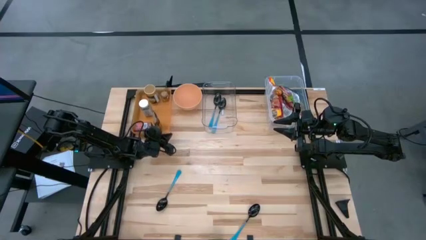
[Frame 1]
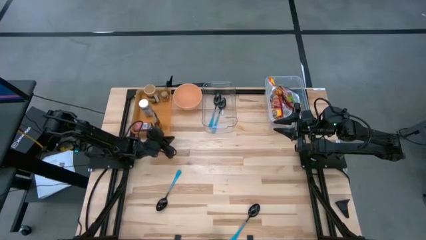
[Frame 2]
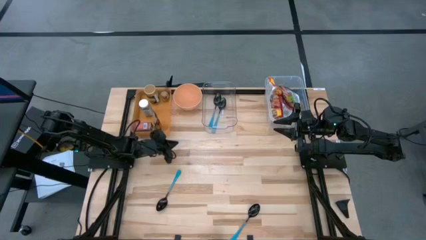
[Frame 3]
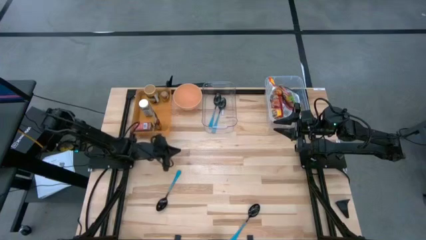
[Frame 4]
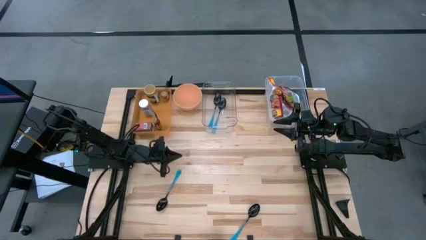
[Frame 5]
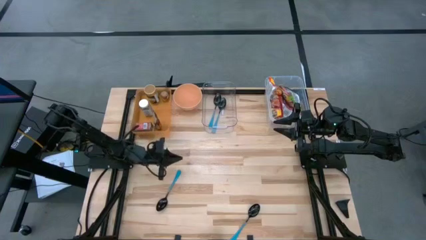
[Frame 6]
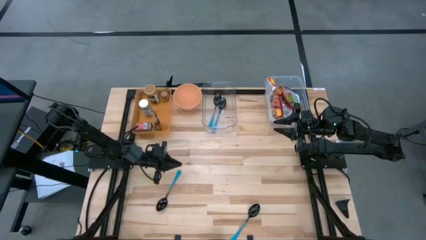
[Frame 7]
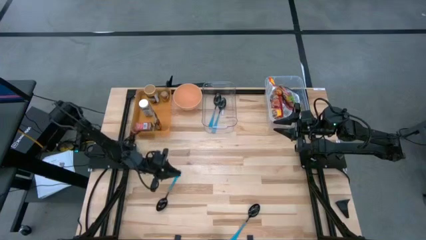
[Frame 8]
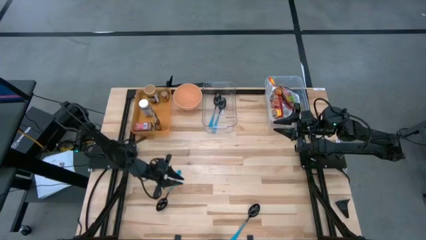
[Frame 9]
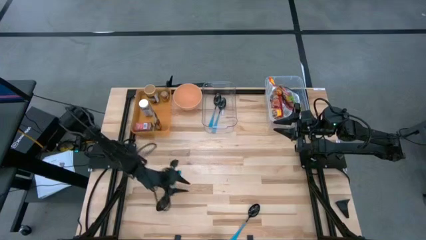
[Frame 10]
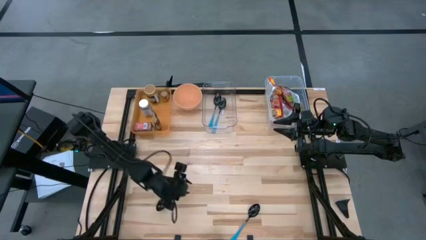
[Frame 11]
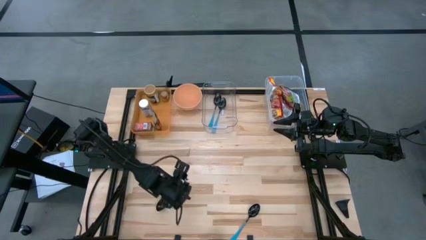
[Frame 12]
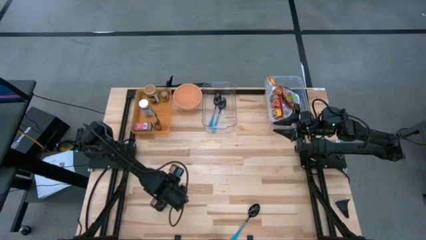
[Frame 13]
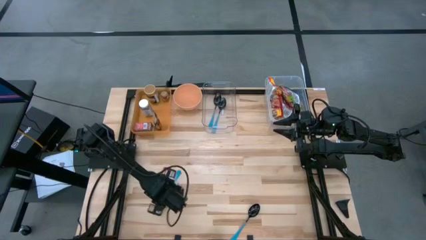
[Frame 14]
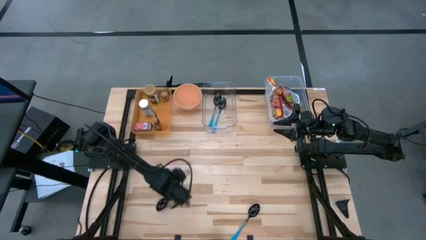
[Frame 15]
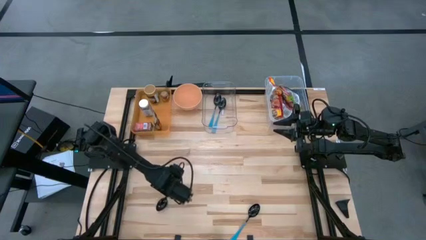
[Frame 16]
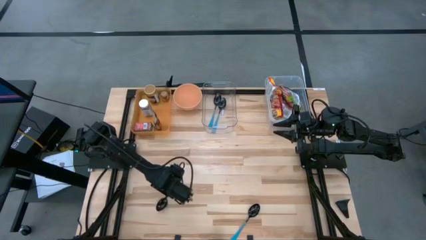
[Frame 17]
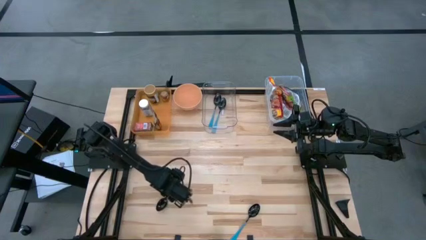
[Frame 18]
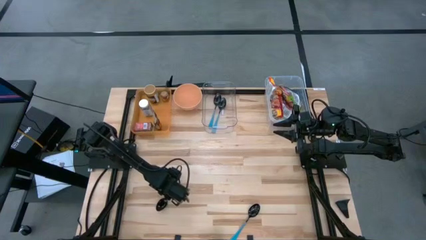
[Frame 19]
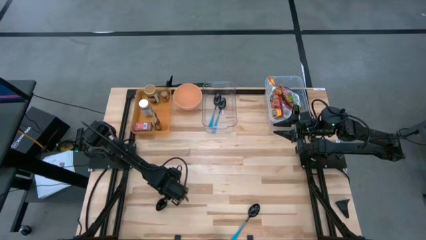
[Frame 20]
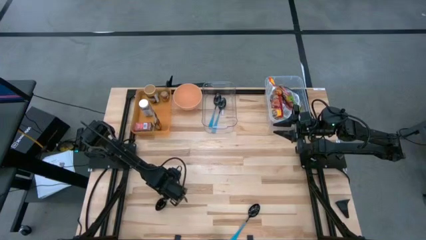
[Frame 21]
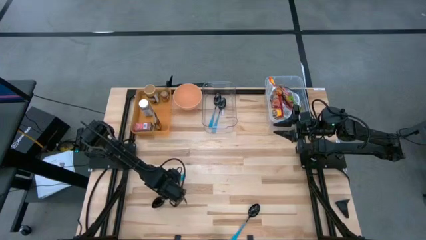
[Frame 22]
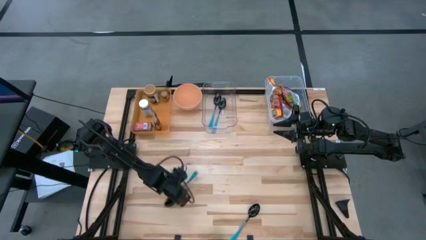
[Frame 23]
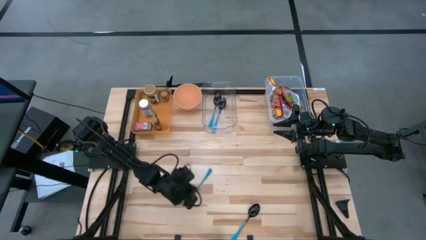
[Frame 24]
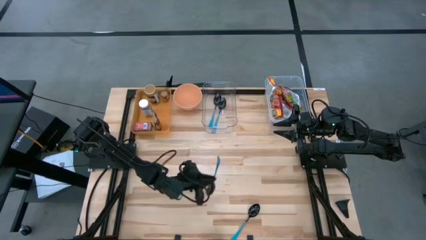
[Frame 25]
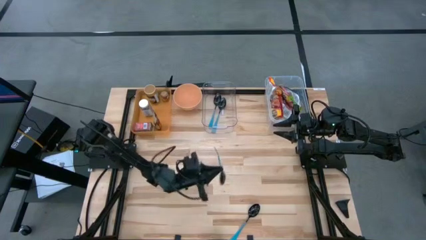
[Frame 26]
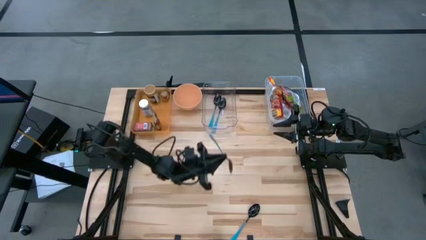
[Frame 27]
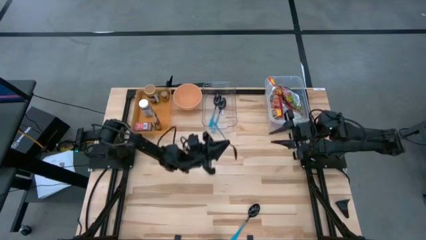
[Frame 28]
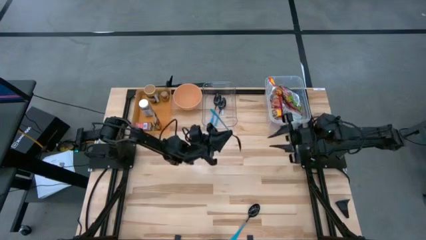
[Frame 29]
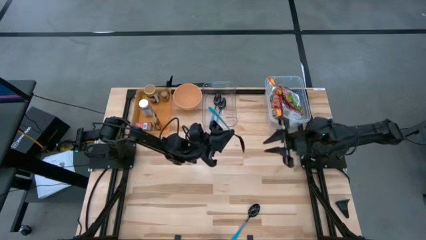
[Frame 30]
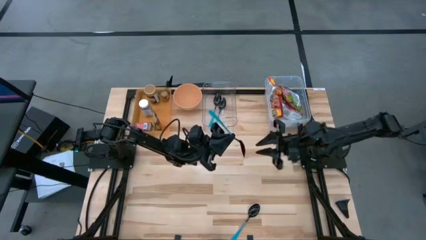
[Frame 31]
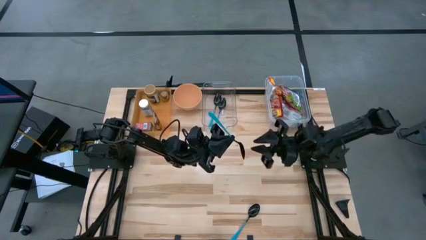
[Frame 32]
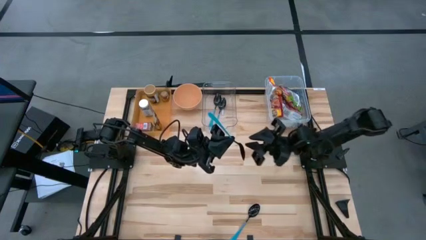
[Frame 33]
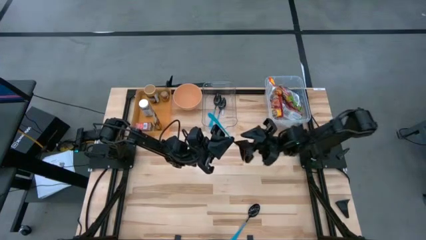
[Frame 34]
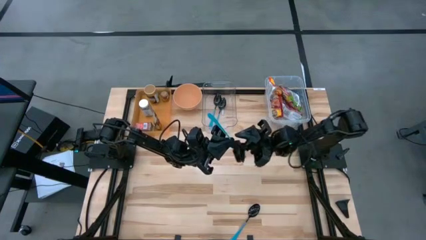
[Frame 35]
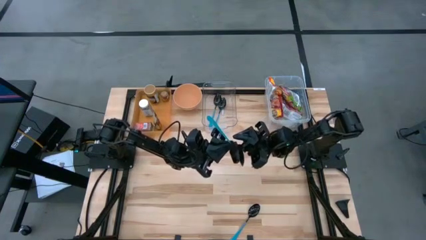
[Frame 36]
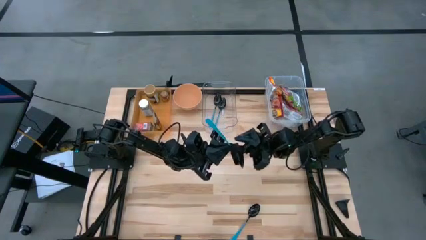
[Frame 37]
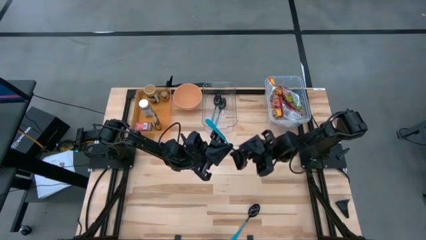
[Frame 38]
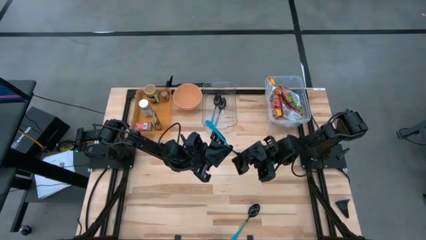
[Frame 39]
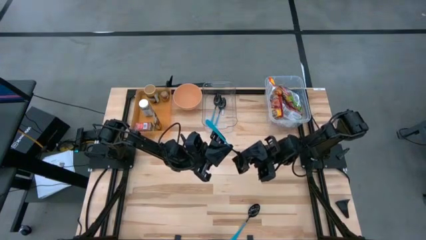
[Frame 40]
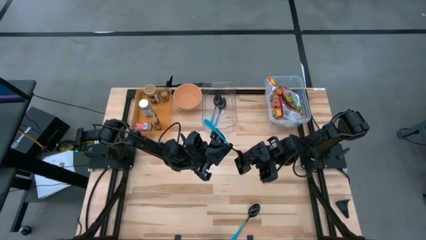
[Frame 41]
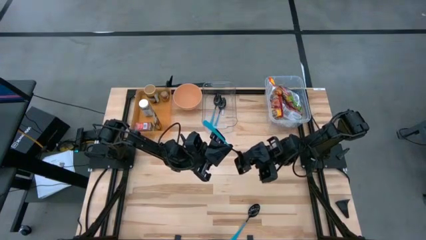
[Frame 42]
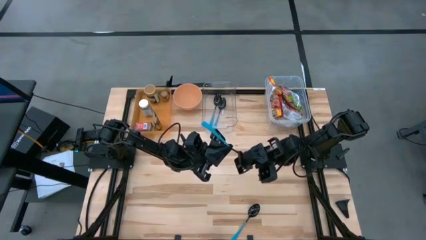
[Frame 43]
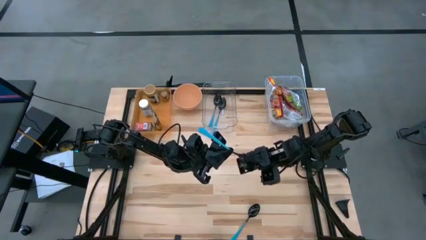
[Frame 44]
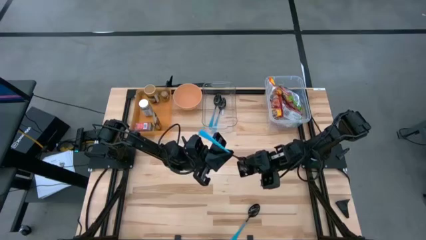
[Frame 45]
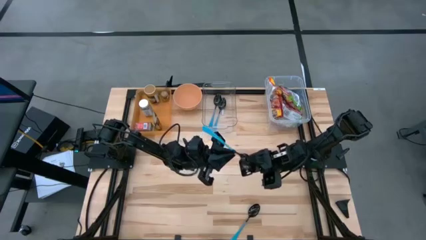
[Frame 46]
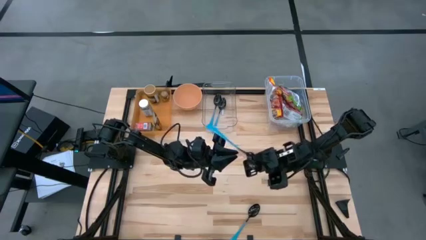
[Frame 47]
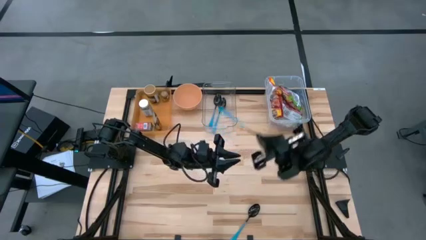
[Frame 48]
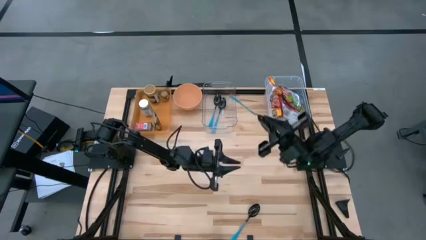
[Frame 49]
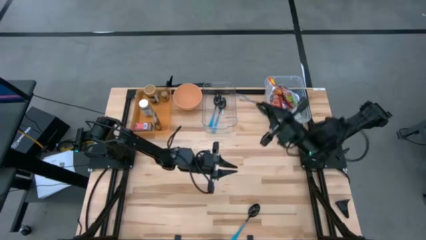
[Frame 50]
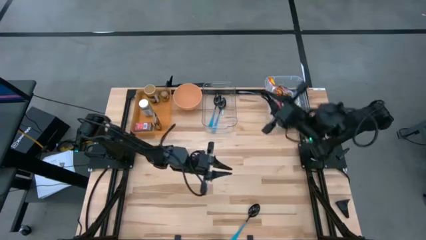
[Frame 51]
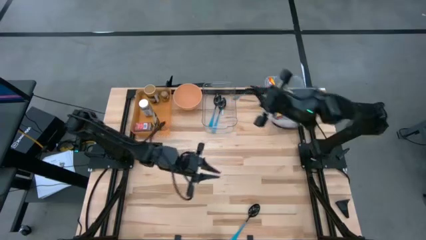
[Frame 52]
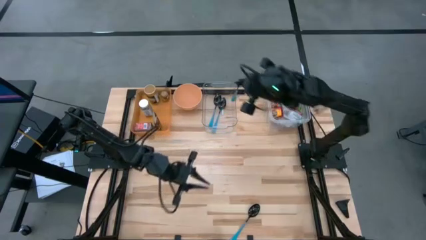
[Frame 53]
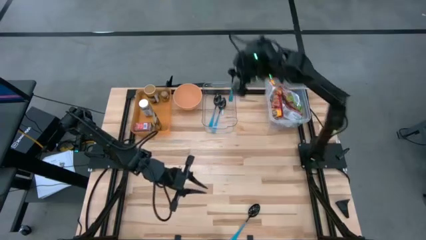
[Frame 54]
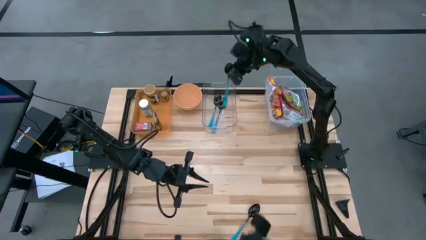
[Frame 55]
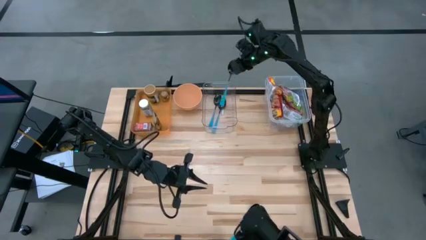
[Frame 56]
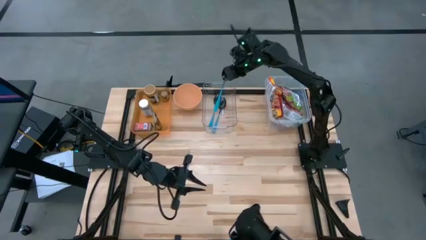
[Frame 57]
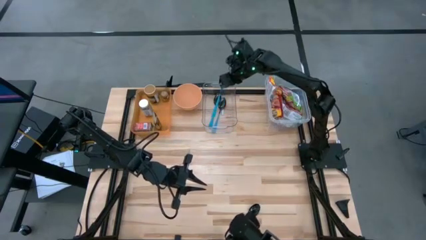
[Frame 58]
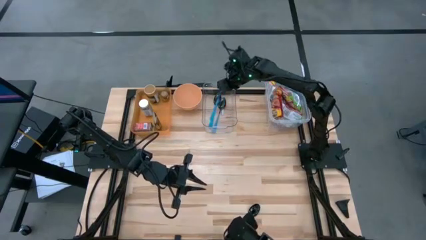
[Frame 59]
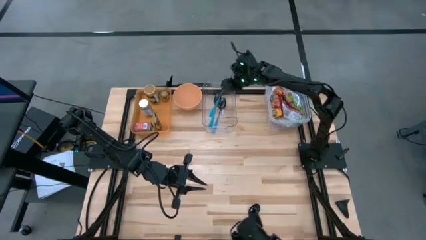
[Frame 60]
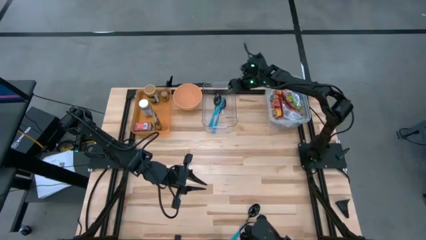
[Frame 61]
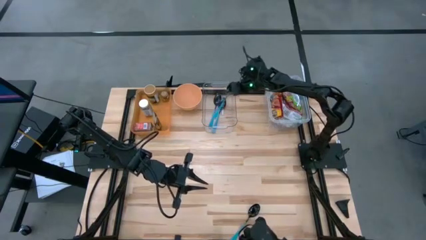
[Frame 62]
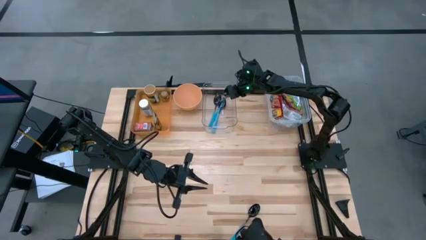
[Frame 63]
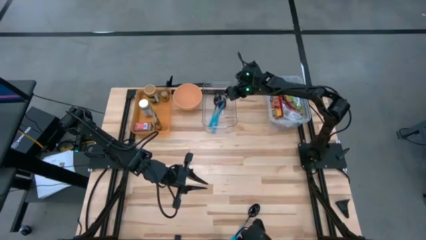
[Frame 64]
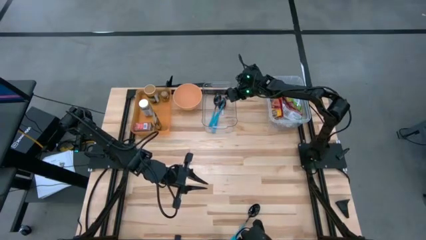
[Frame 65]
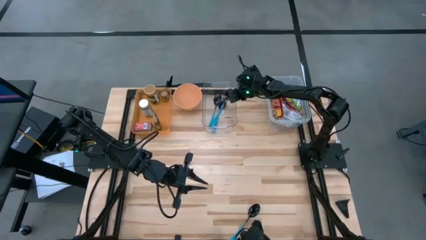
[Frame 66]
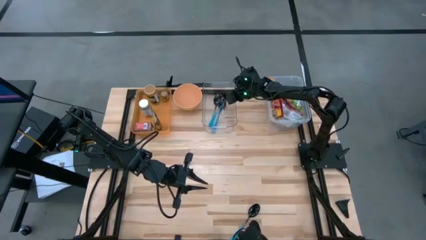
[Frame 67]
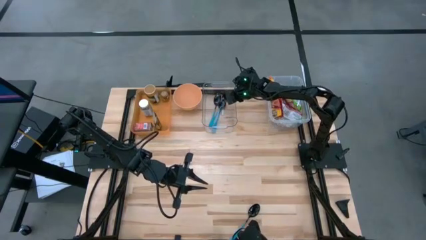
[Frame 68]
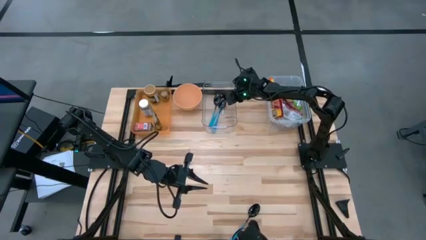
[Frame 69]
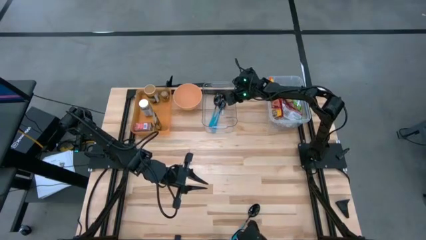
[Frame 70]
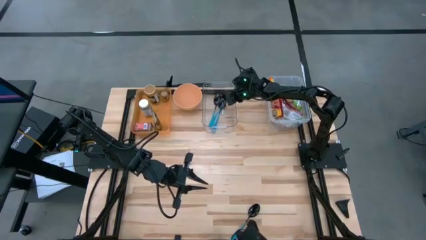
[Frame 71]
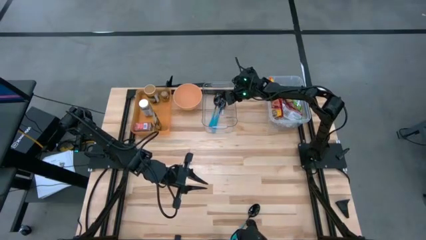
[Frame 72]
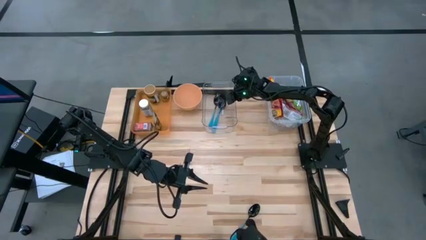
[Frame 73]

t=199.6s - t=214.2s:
Task: Pick & Place Food Item
Put the blue spoon into the transparent bin
